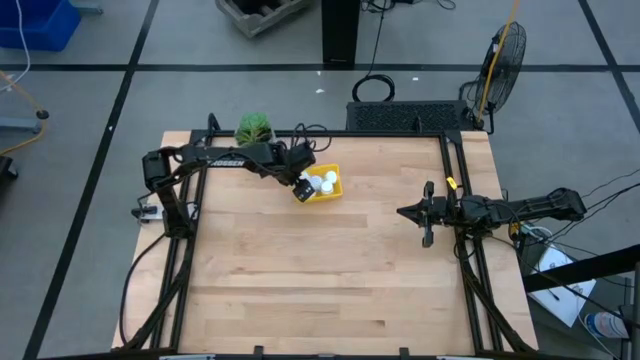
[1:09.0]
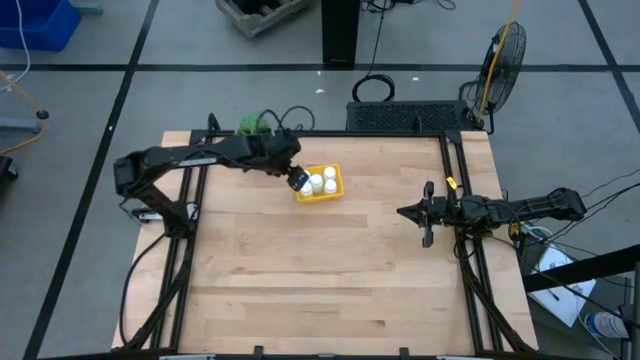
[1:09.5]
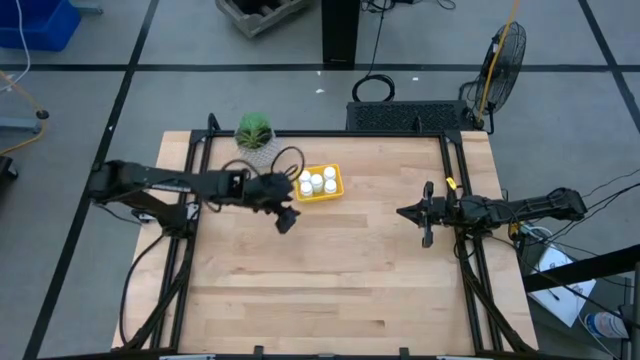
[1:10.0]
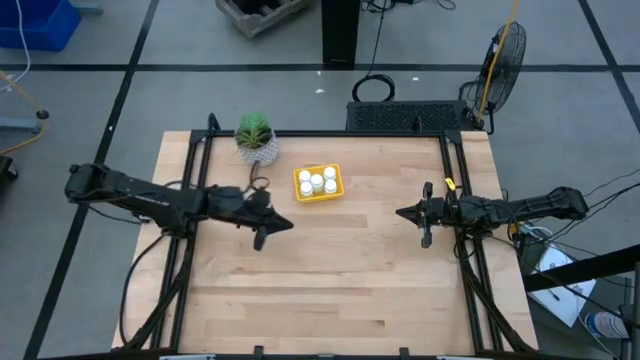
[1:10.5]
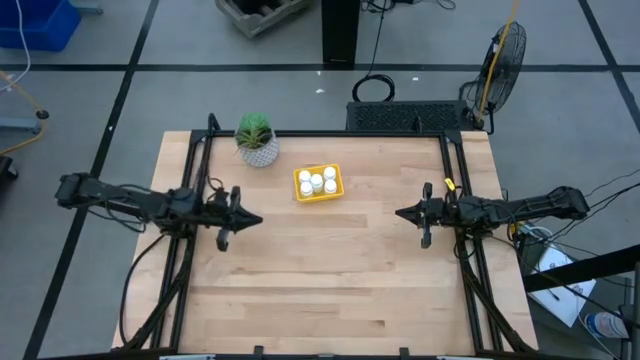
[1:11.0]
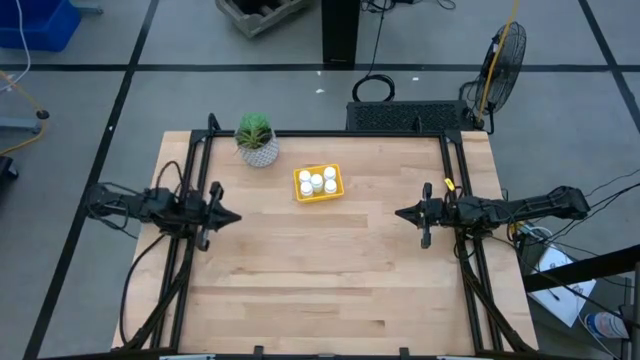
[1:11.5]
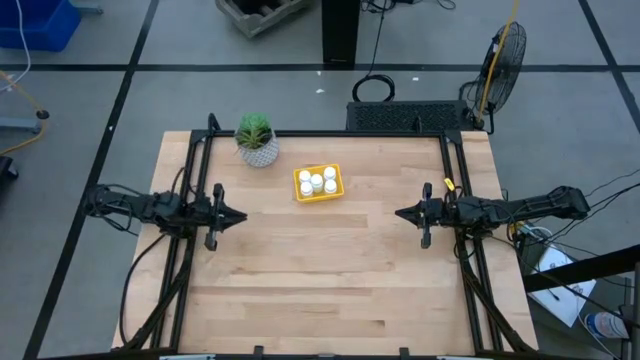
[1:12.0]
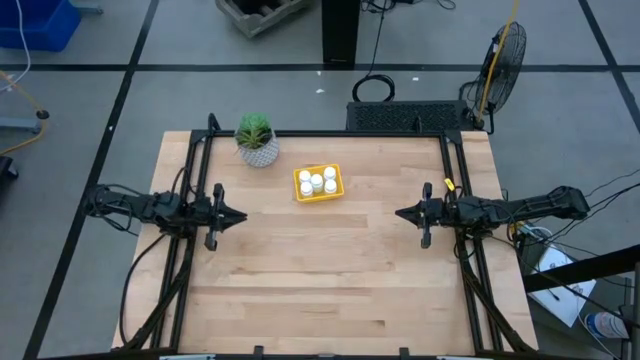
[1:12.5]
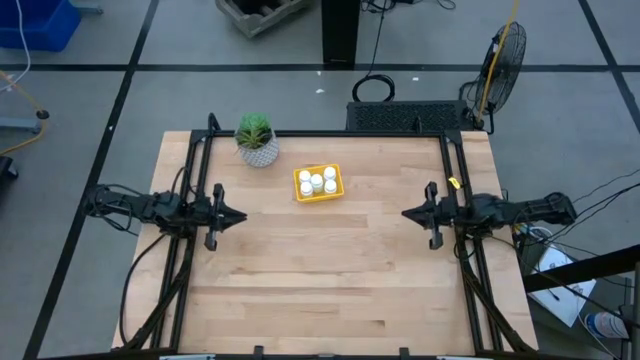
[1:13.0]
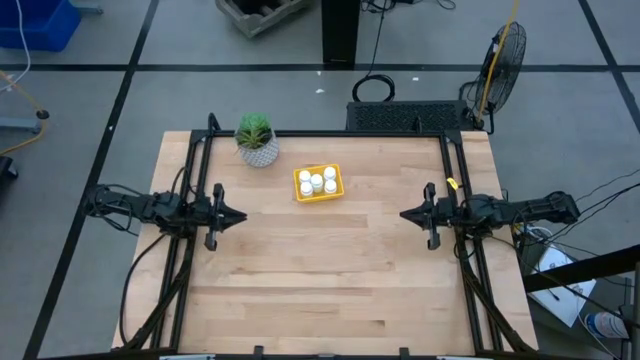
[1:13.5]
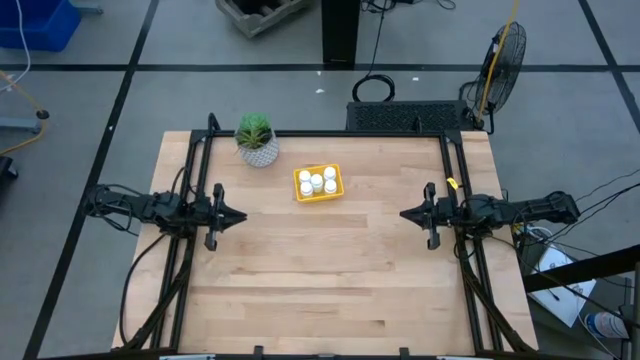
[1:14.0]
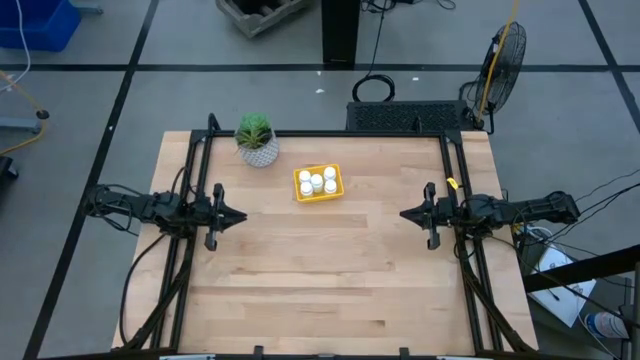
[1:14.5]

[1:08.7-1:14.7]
Task: Pick and place pill bottles into a basket
Return to Home Position

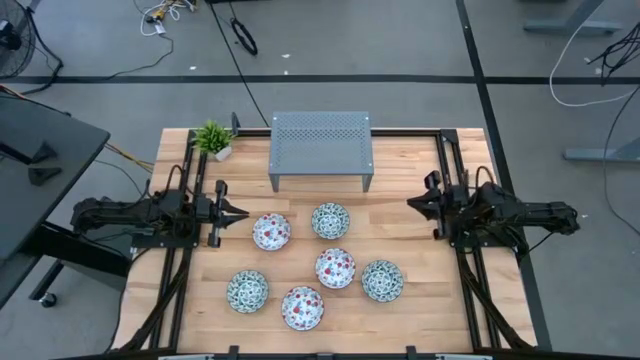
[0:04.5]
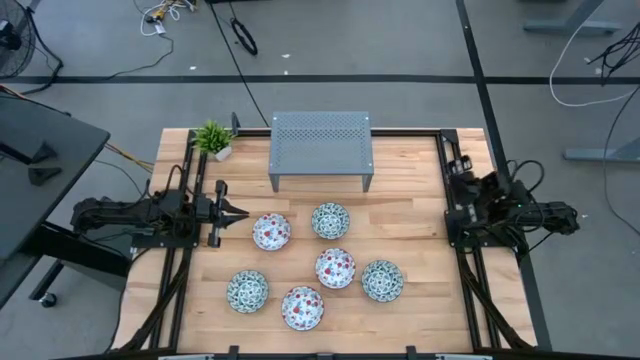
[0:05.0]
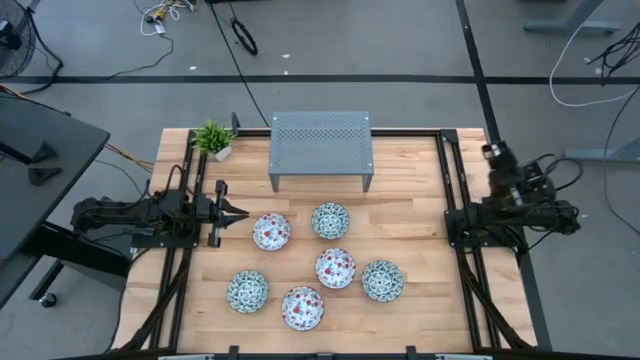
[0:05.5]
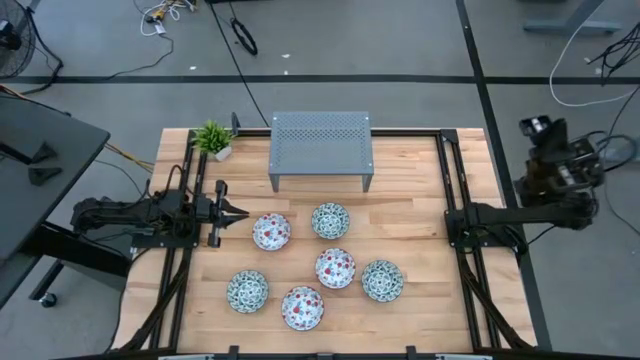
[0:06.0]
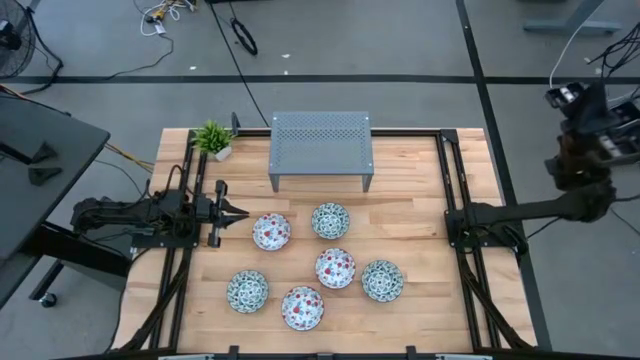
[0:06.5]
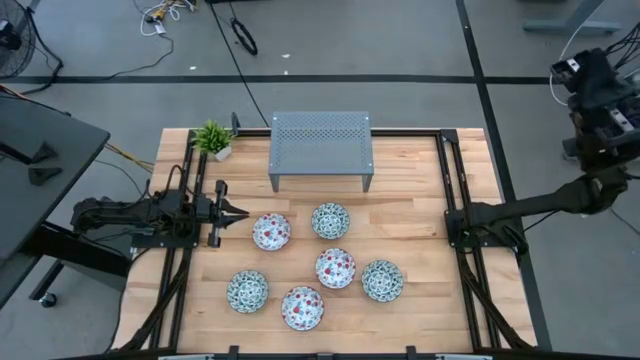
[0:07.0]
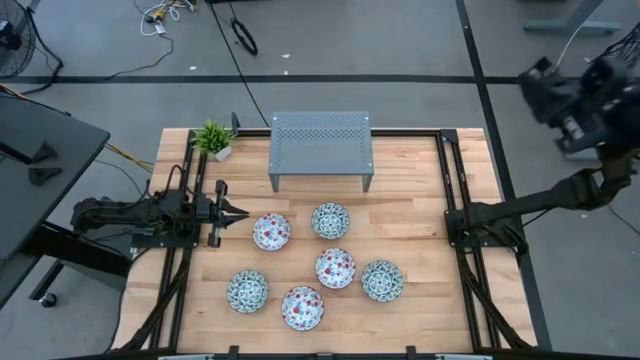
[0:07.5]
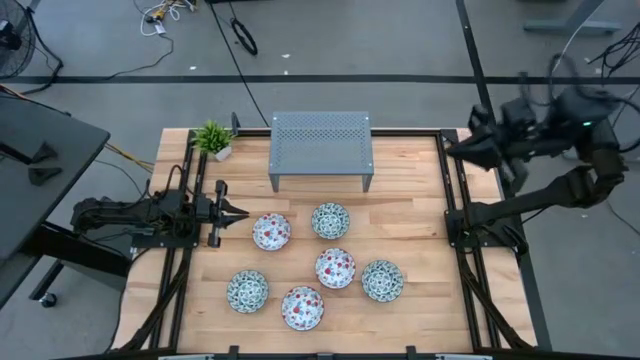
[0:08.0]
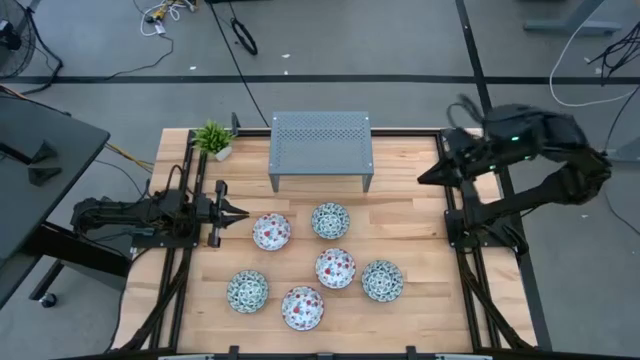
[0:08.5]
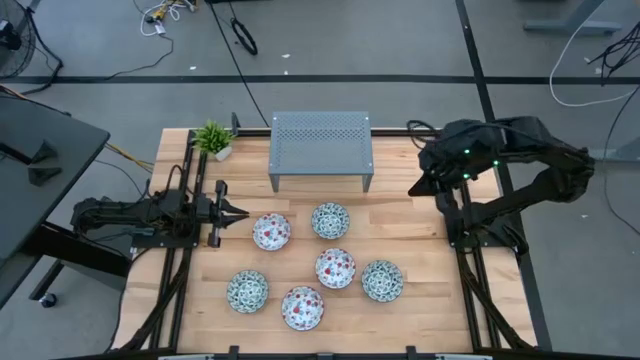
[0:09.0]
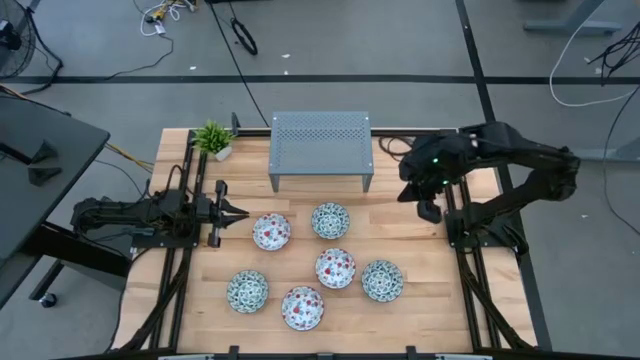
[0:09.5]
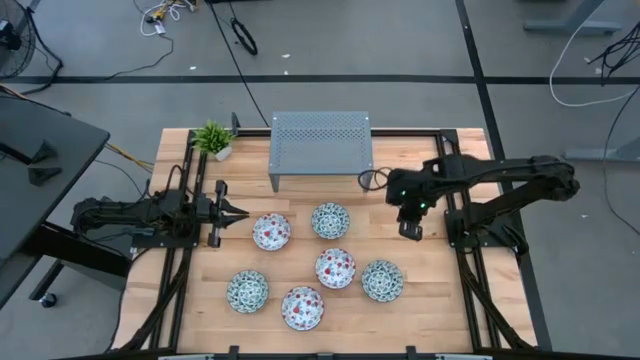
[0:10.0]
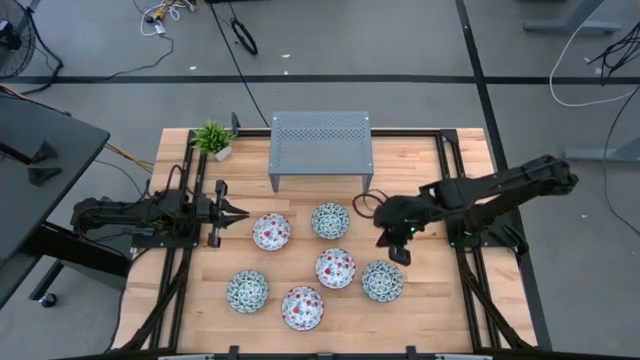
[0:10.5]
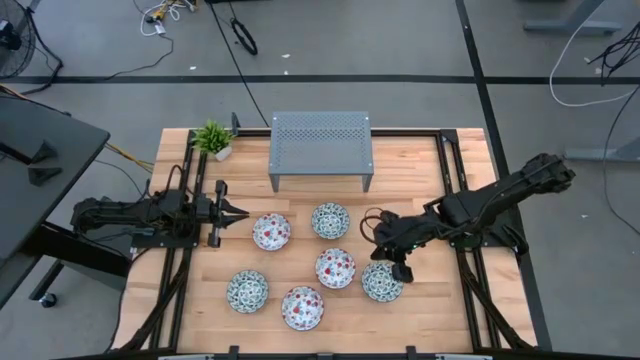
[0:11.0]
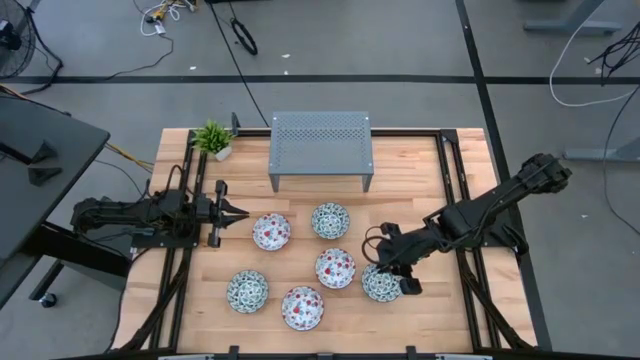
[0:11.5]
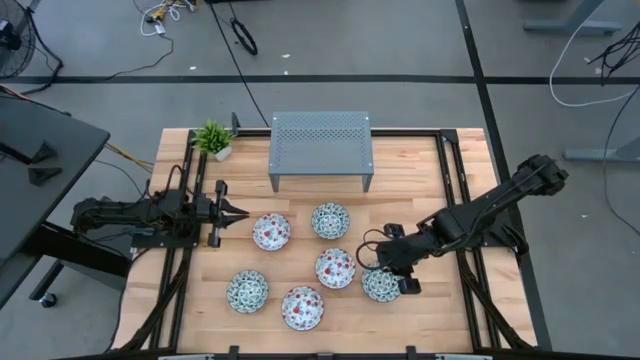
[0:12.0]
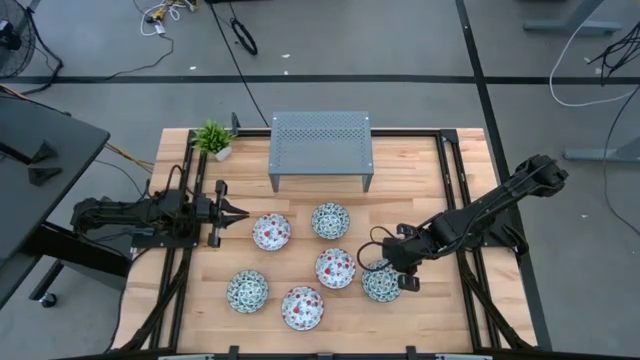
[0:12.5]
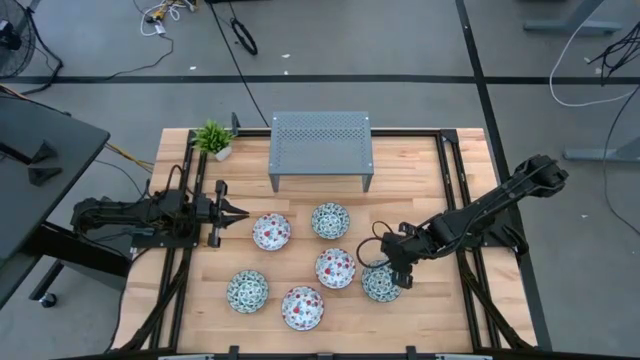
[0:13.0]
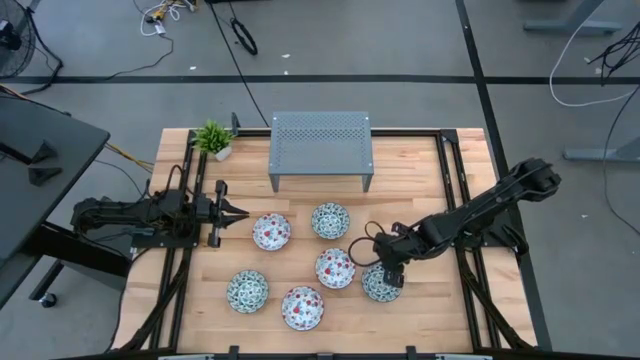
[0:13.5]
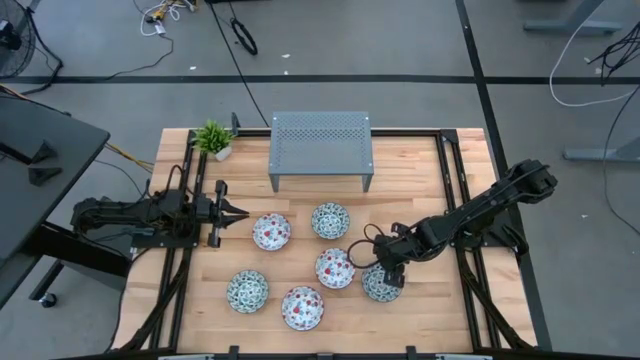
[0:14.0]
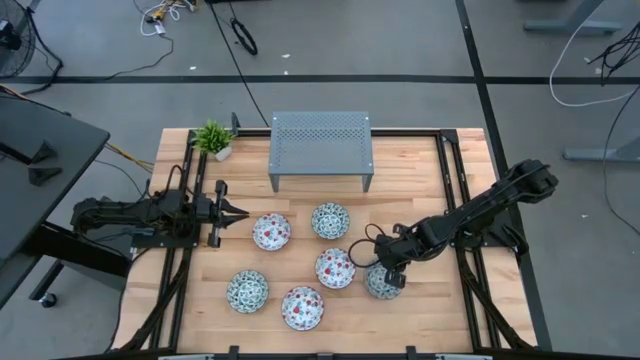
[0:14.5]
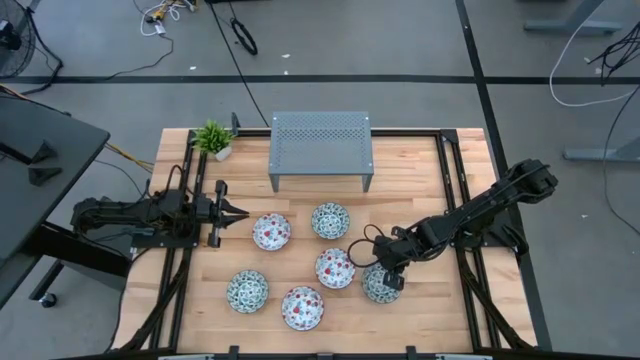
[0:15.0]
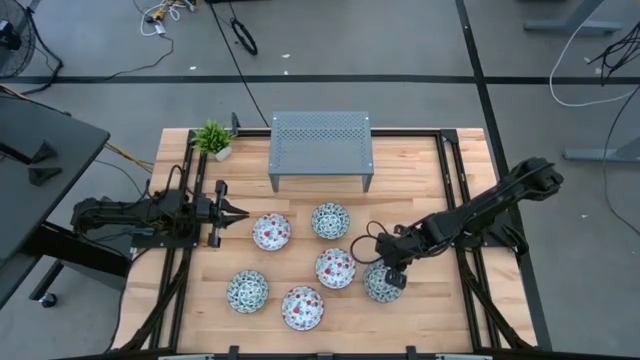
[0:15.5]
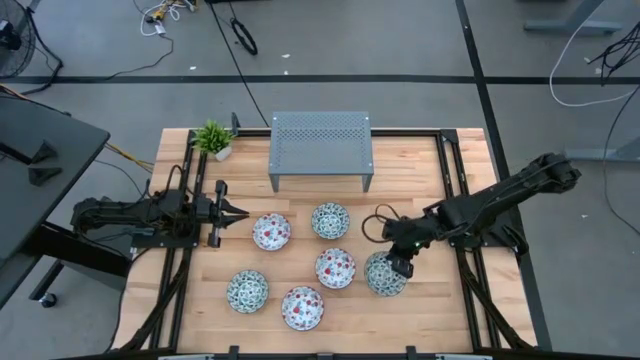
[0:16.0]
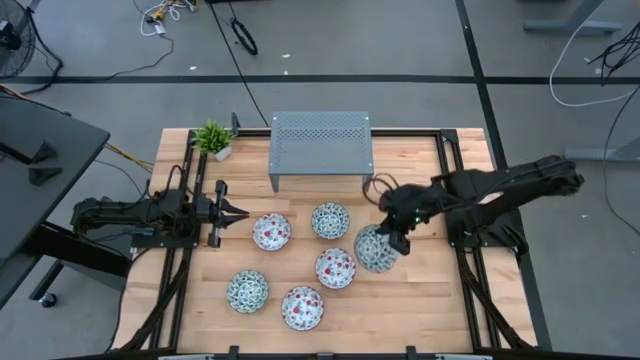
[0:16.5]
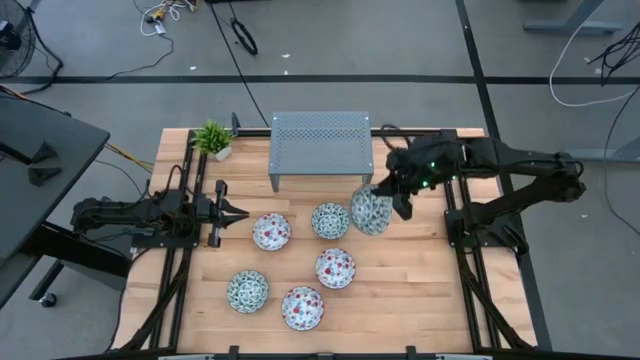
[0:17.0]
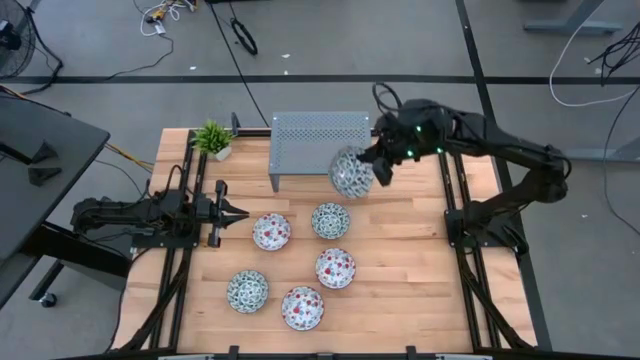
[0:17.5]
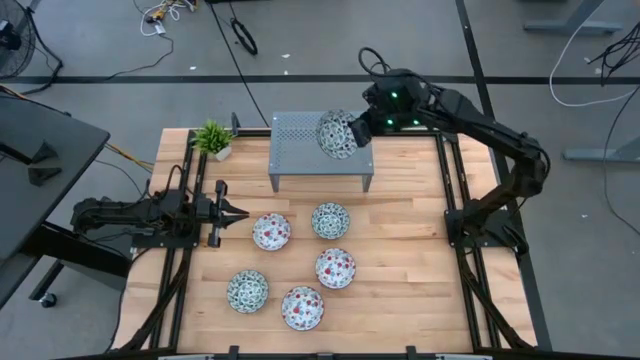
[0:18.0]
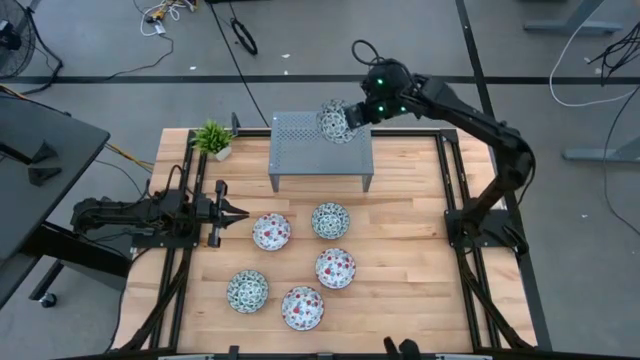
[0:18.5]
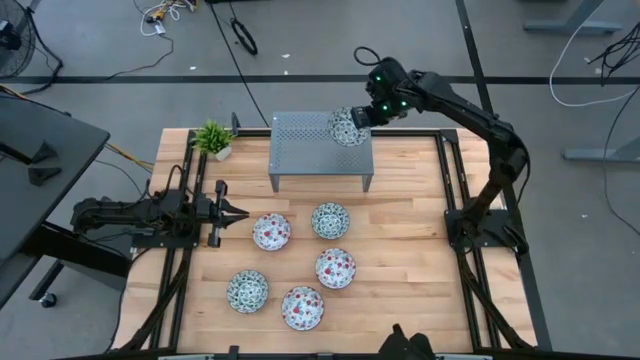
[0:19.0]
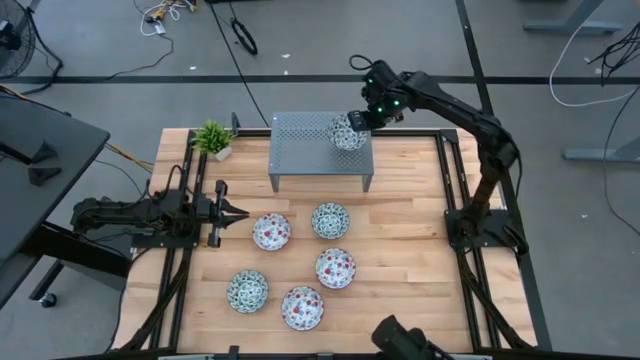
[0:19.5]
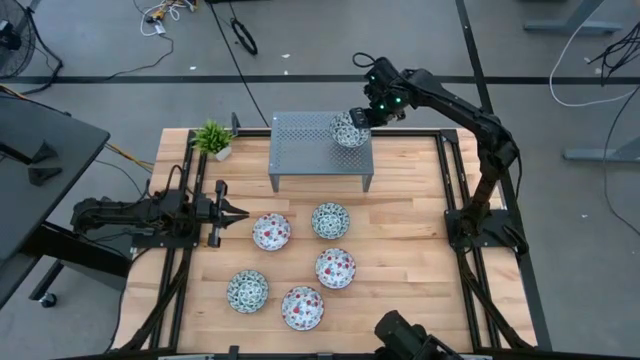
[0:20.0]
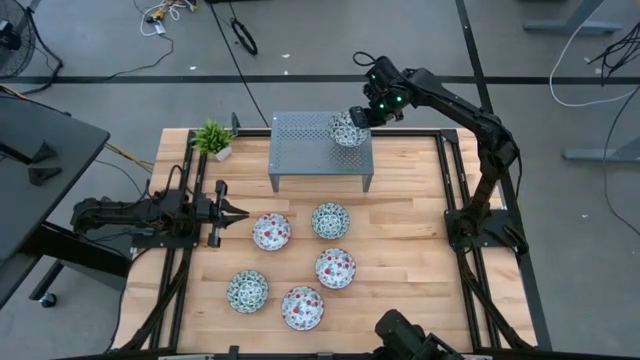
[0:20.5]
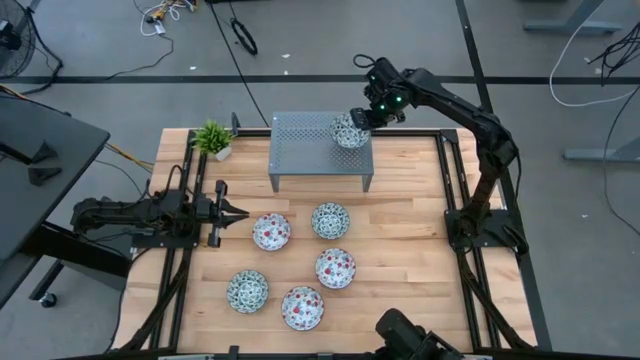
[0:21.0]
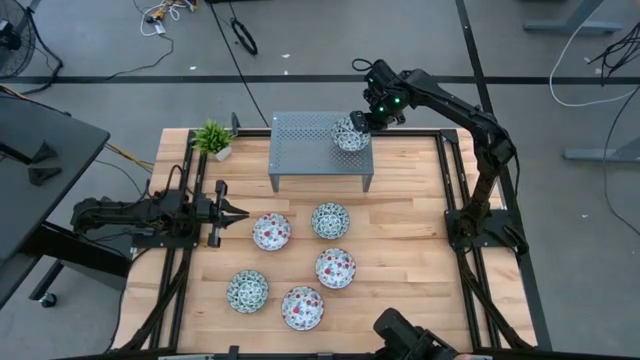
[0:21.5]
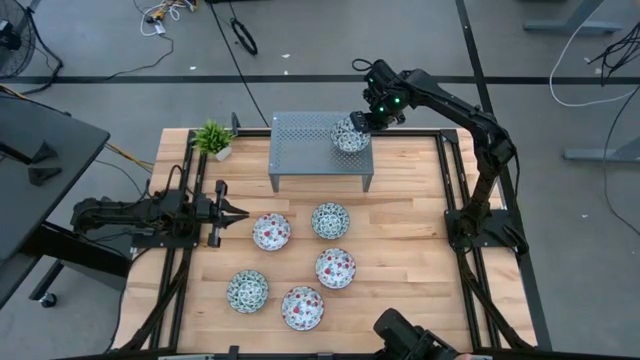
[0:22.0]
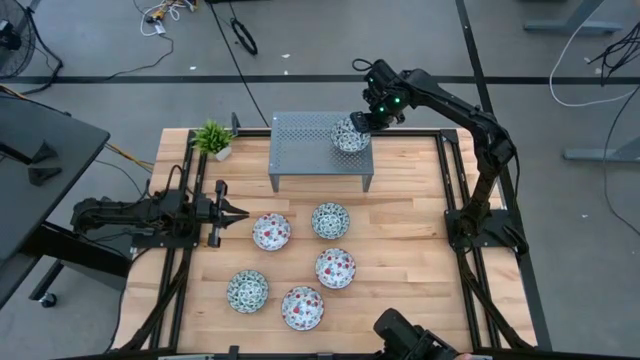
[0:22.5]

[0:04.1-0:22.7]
Task: Pick & Place Mini bowls
Put the bottom right blue and white patterned bowl on the shelf
